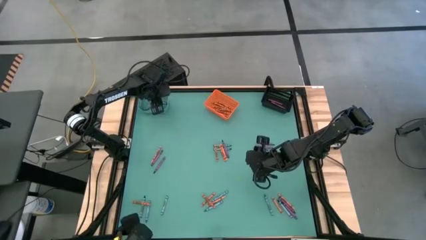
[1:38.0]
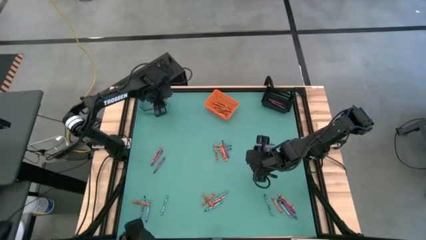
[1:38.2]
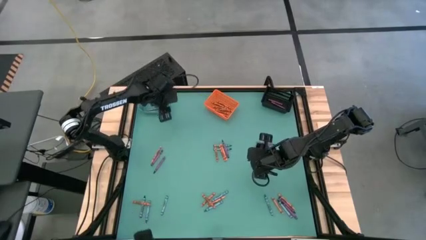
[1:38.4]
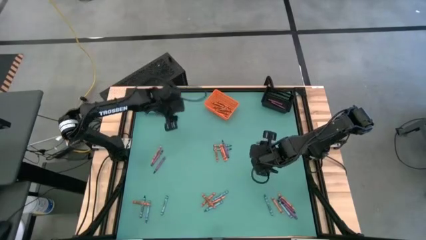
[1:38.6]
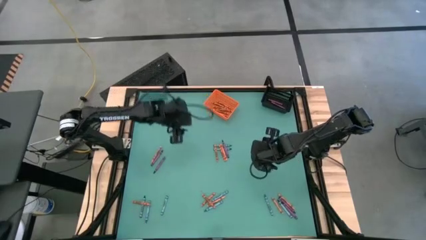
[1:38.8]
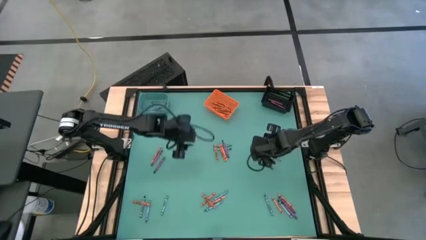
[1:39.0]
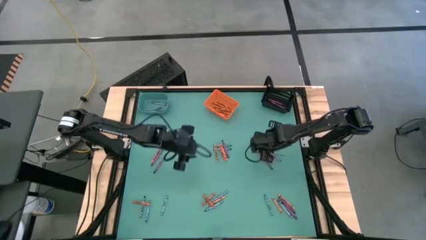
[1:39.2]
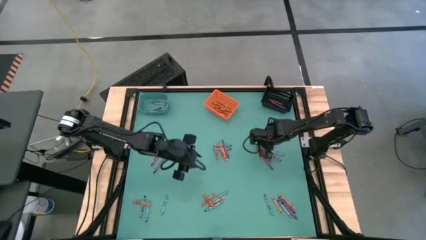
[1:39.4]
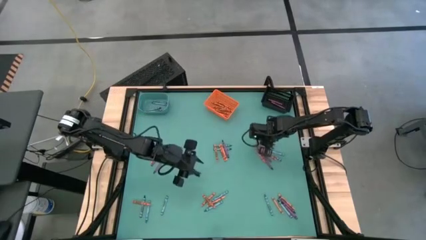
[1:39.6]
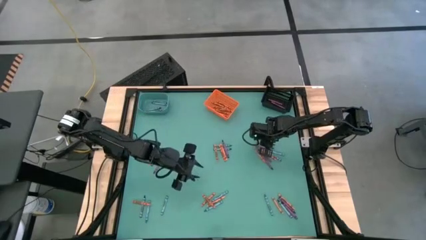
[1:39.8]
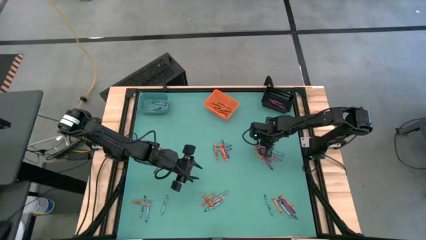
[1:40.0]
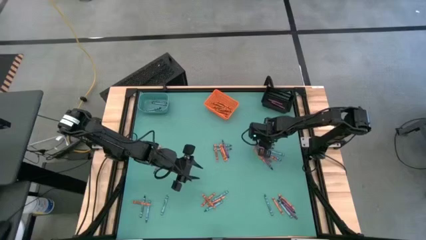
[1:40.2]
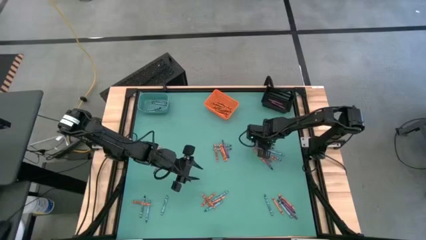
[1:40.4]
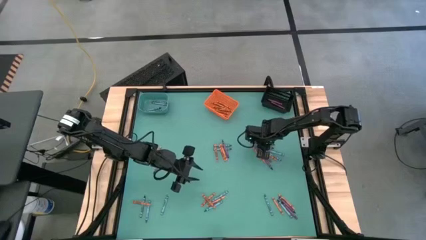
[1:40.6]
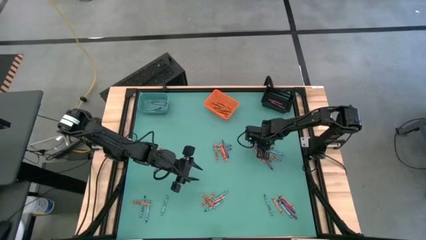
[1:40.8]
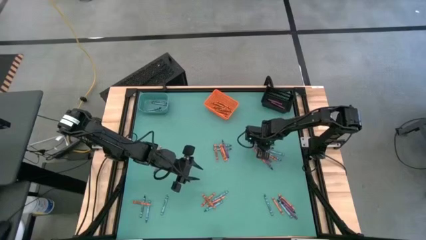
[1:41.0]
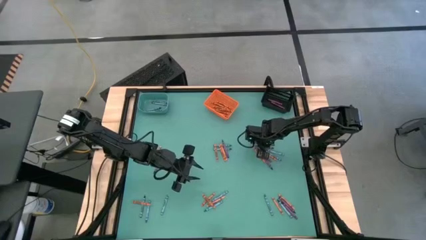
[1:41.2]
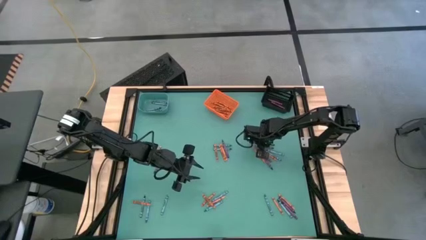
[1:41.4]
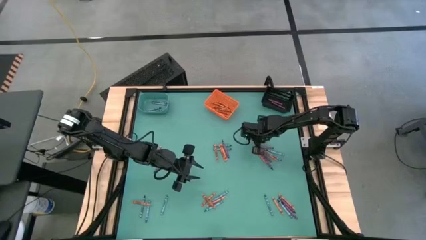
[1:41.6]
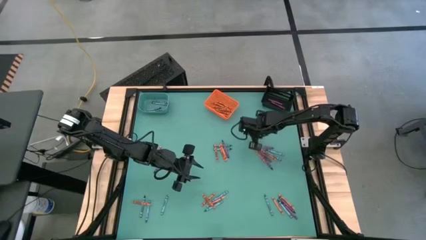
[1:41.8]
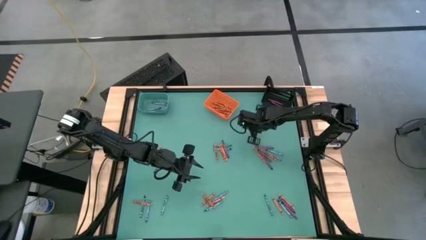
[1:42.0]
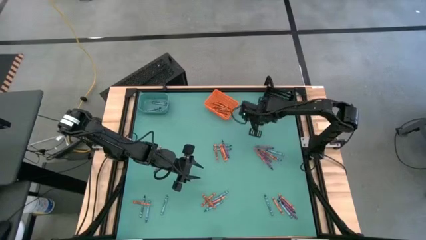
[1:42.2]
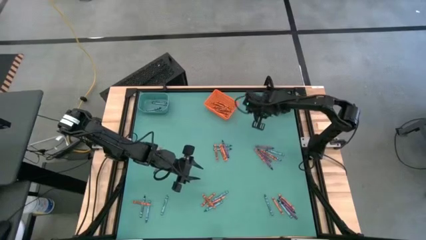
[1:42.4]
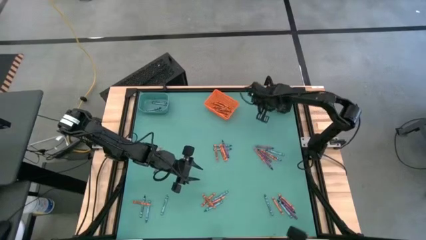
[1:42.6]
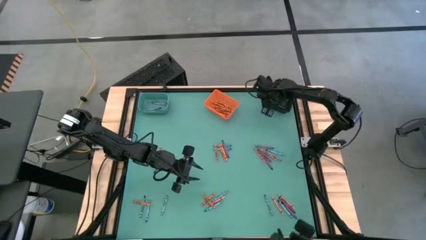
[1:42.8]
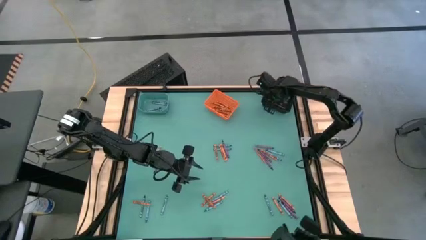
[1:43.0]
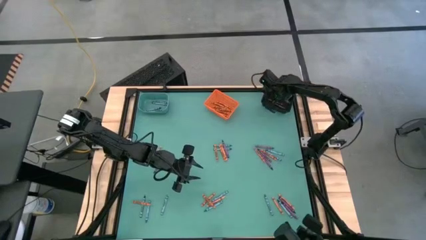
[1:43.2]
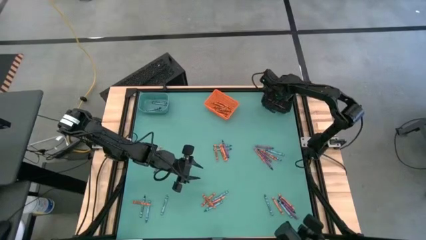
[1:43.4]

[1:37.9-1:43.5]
Task: Sort crayons
Put the violet crayon into the black bin

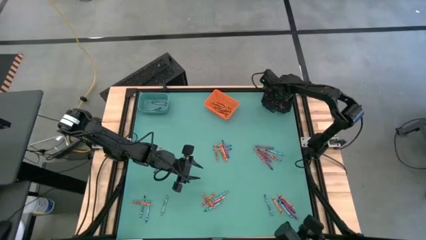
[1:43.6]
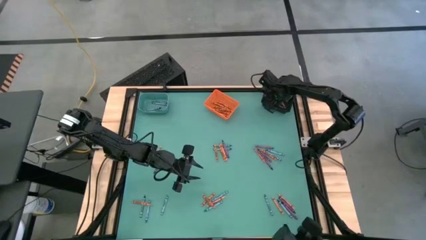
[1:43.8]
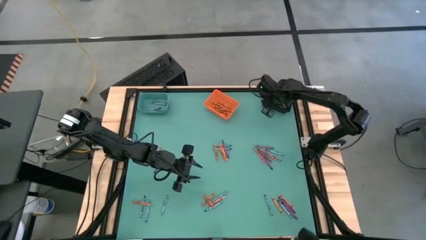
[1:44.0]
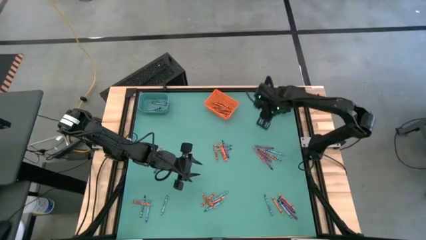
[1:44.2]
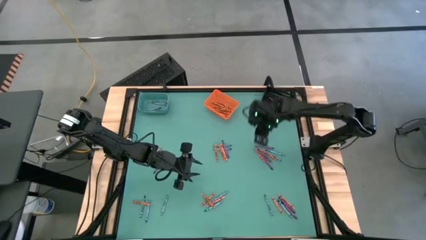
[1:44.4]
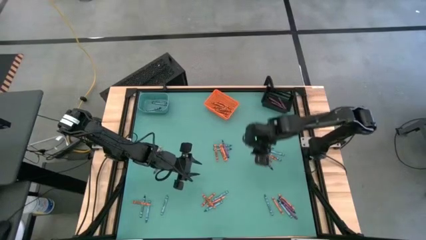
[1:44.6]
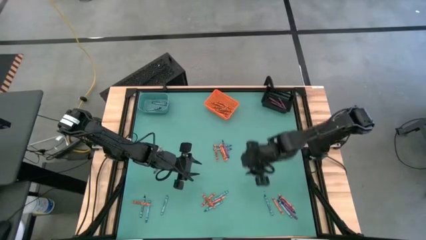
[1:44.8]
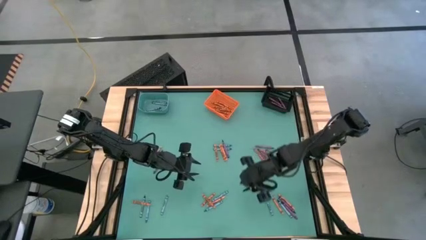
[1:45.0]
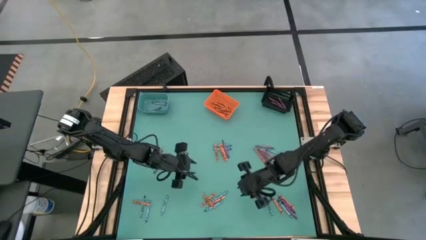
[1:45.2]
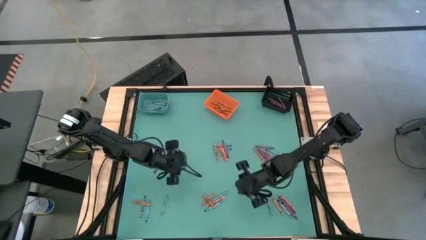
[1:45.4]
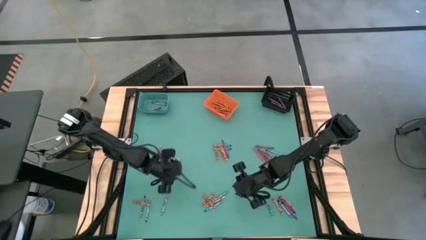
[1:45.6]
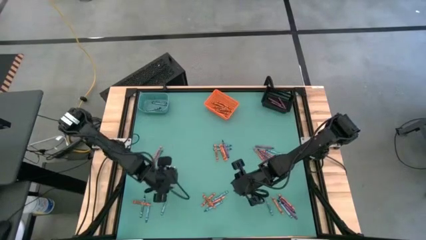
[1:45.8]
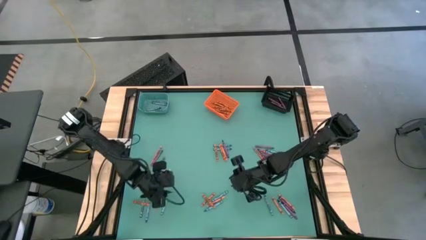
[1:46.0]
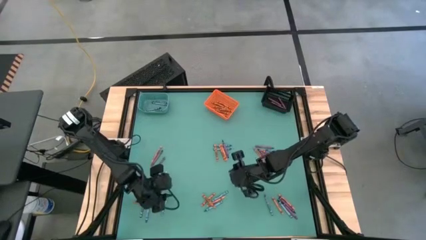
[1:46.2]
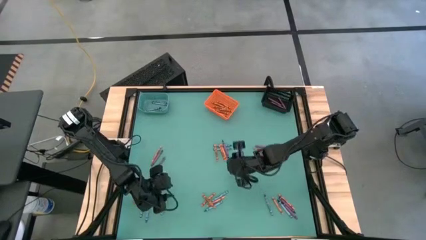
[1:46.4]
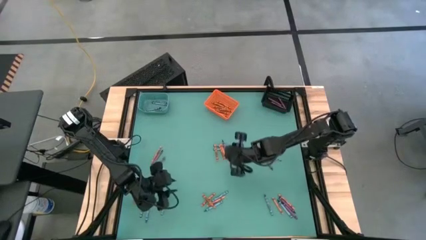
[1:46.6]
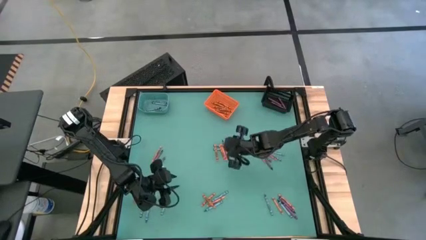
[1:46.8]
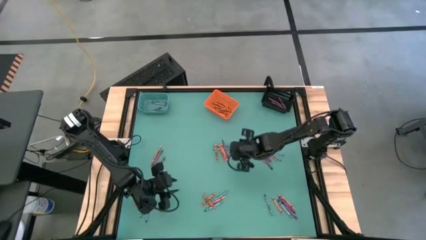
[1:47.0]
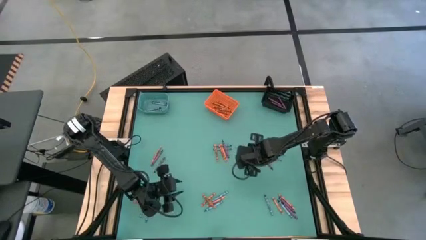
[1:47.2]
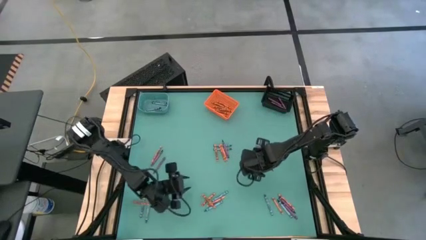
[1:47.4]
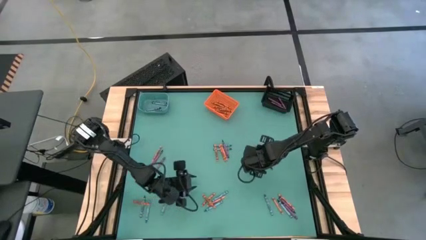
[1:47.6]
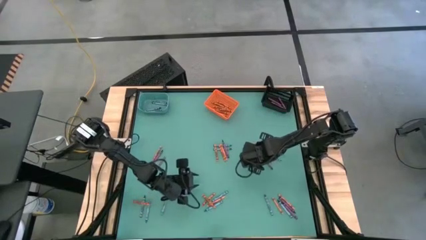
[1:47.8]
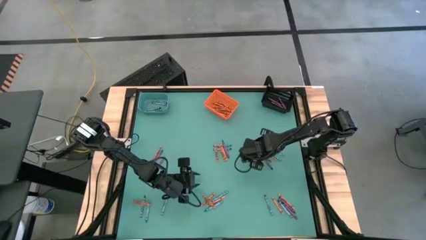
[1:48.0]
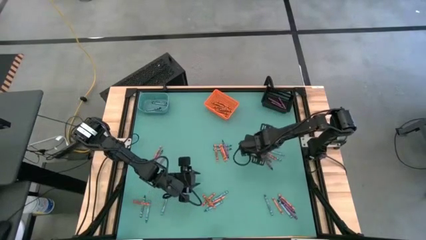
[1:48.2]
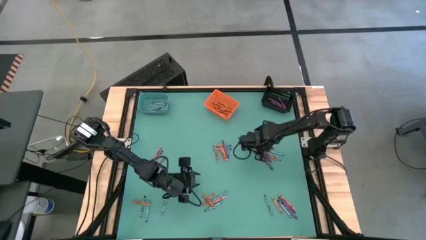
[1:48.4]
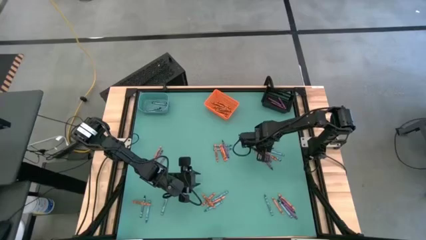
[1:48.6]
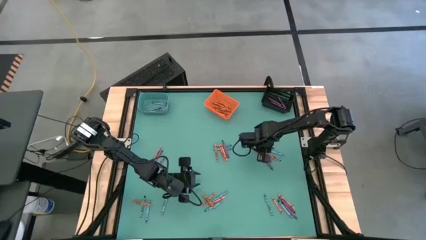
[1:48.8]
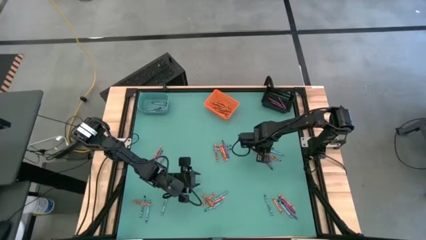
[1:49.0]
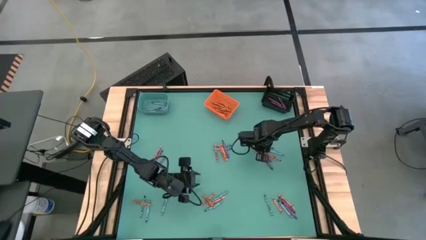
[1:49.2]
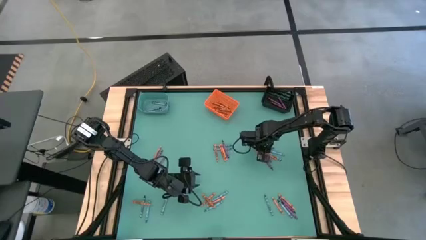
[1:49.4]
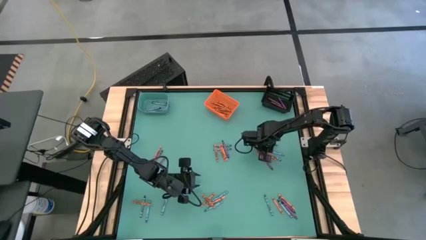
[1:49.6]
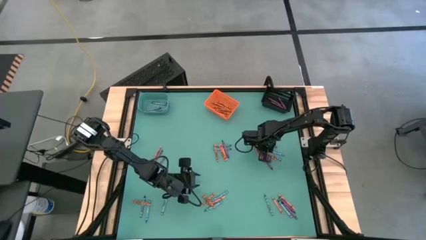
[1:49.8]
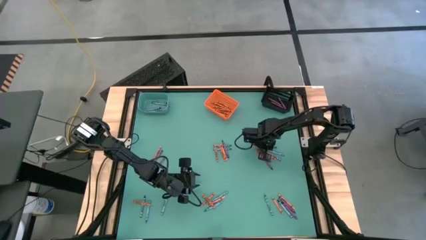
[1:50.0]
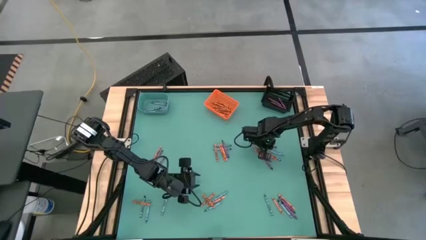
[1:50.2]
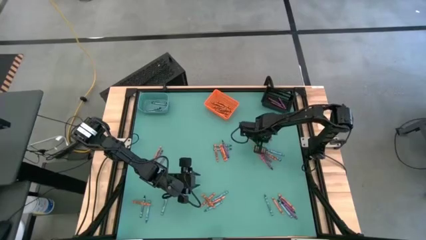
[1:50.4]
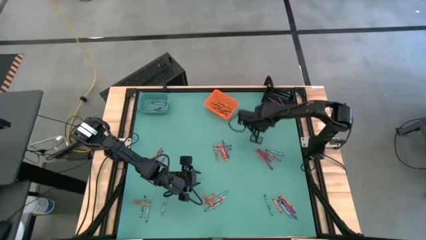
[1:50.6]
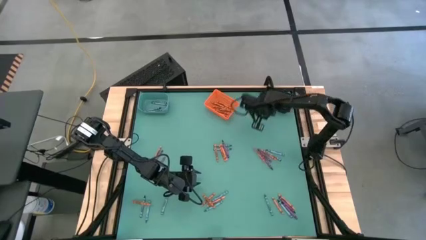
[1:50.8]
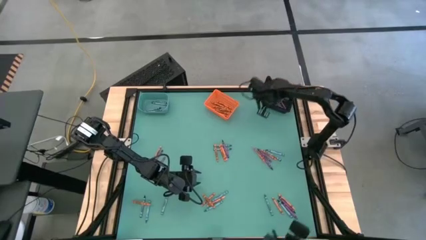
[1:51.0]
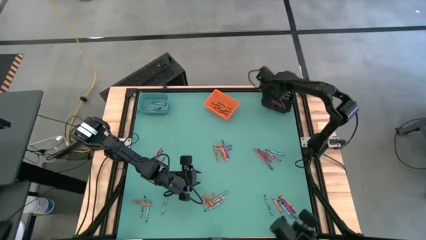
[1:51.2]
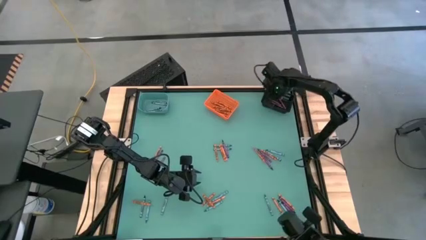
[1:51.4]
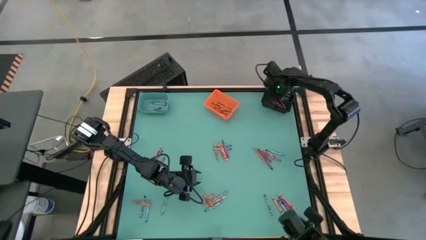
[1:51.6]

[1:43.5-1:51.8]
Put the violet crayon into the black bin

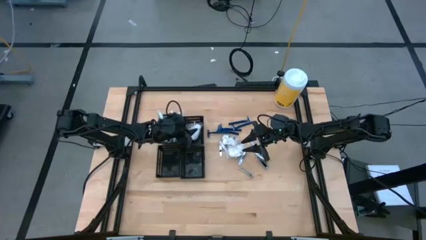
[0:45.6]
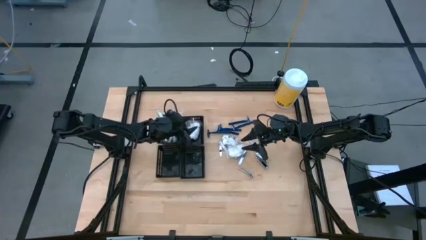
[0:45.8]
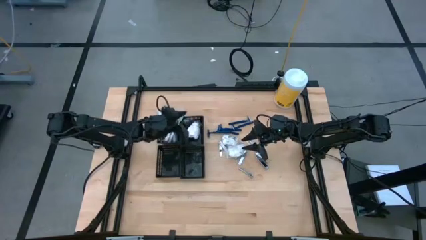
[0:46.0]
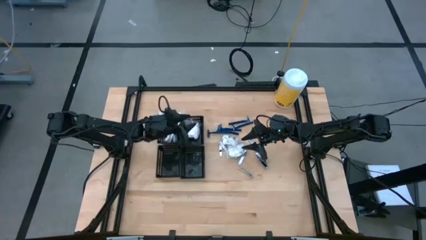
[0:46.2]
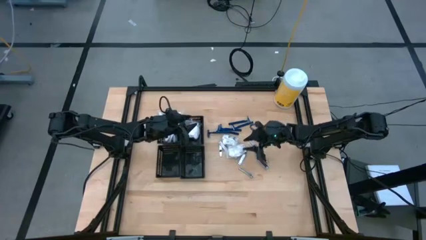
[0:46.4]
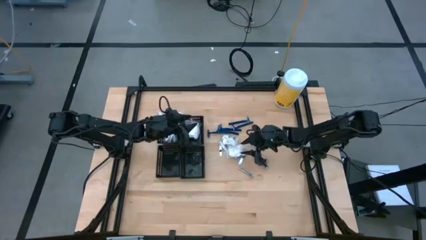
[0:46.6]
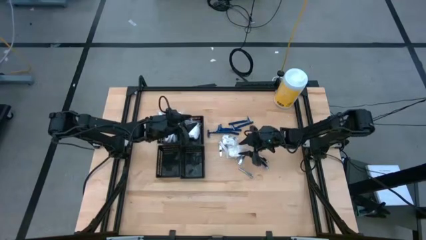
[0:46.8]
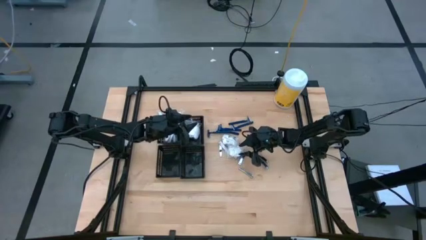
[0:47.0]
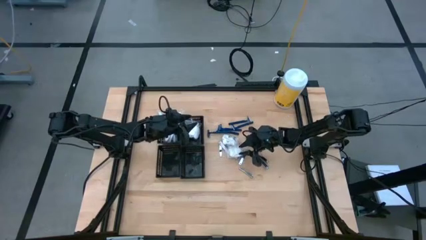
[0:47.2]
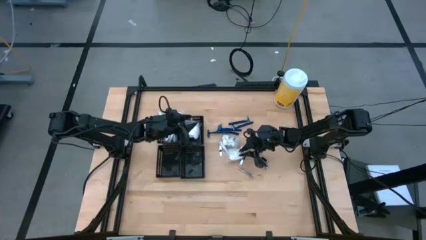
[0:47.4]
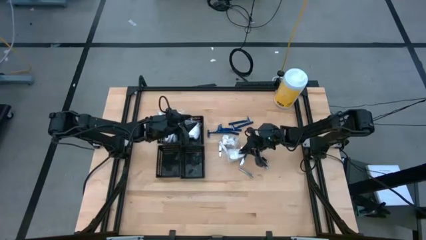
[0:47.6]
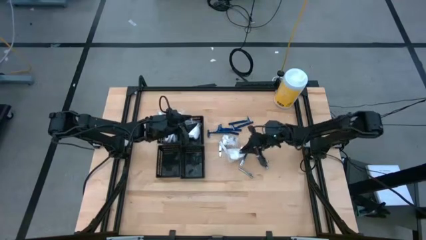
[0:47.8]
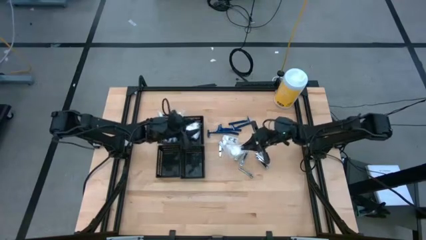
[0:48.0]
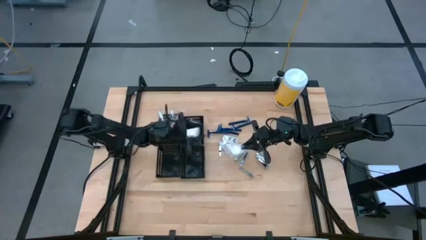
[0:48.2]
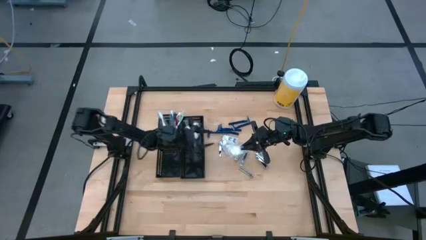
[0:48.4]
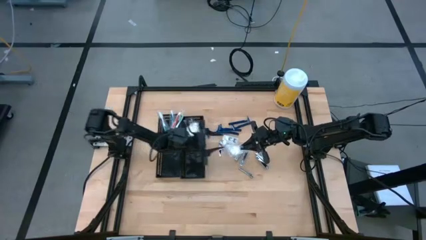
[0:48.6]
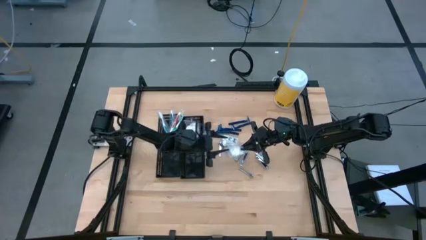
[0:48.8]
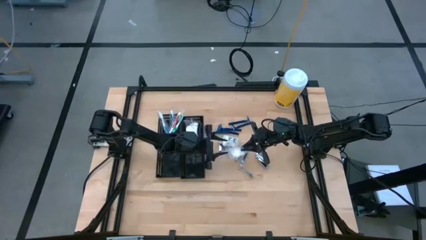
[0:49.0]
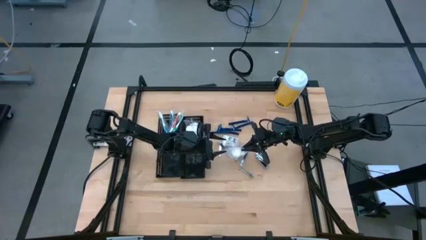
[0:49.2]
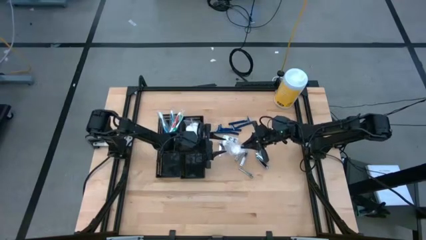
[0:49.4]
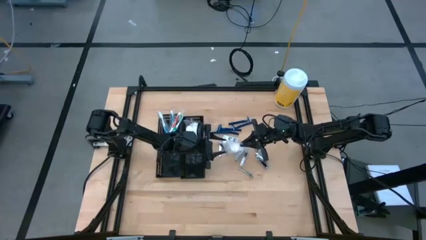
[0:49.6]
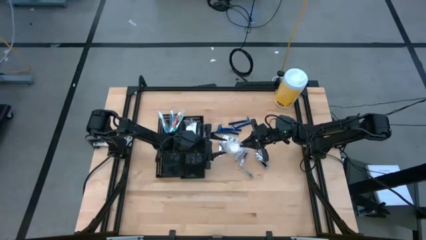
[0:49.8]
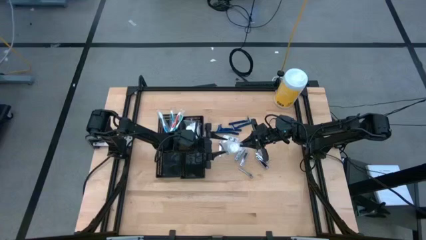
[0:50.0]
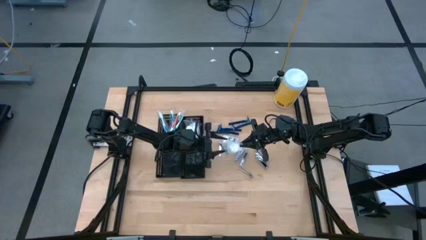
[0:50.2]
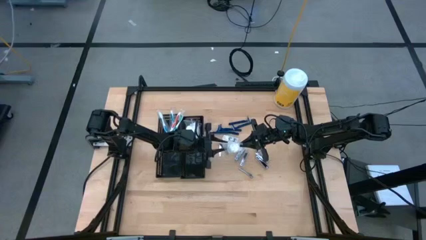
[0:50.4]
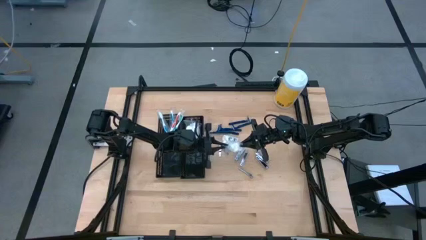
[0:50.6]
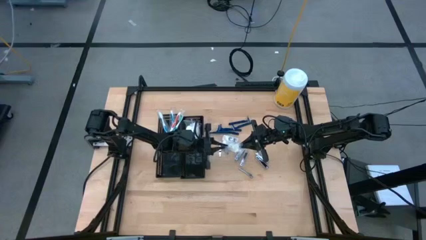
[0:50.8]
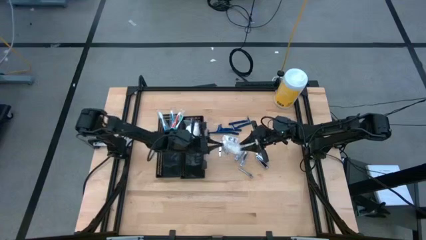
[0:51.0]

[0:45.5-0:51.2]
Task: Pick & Place Travel size toiletries
Put the cotton pack into the top right black bin
